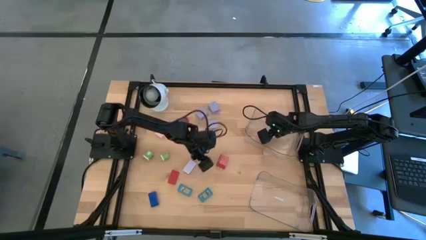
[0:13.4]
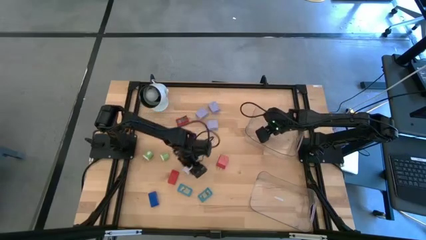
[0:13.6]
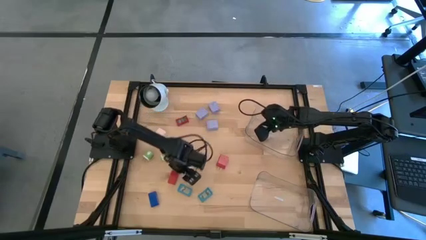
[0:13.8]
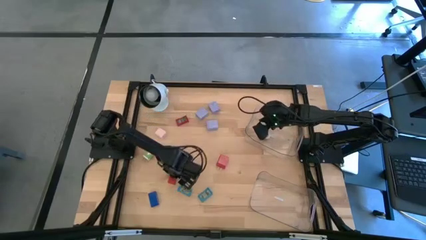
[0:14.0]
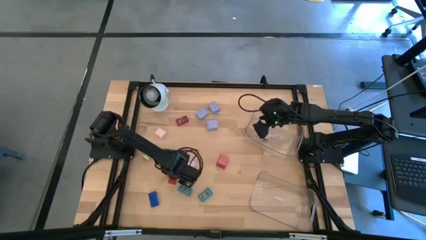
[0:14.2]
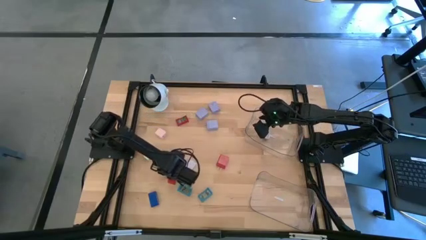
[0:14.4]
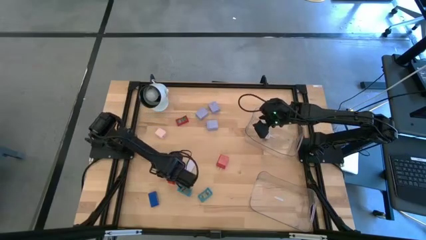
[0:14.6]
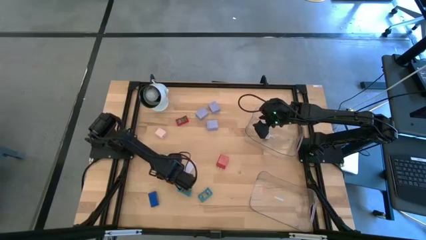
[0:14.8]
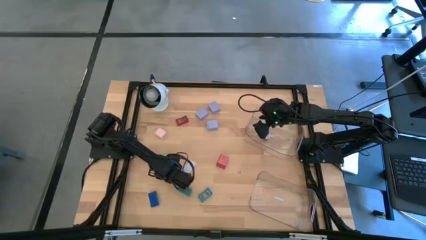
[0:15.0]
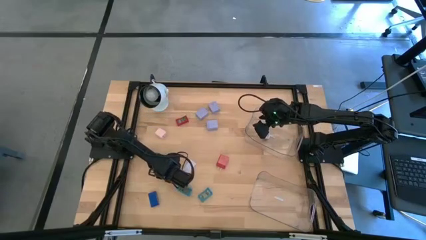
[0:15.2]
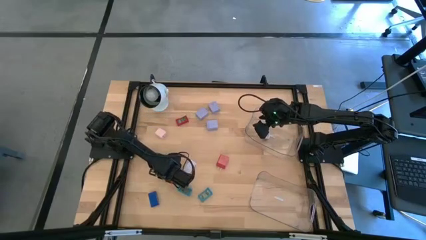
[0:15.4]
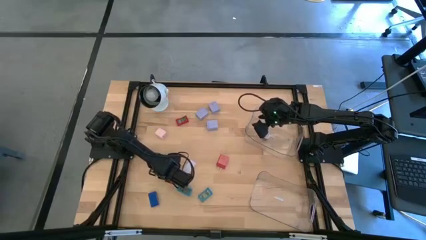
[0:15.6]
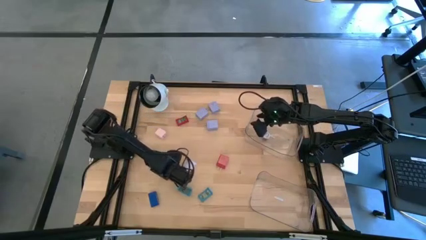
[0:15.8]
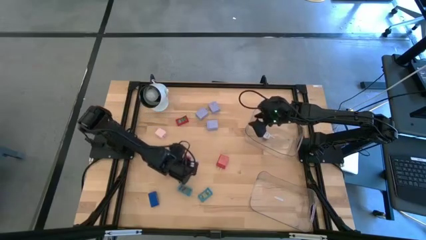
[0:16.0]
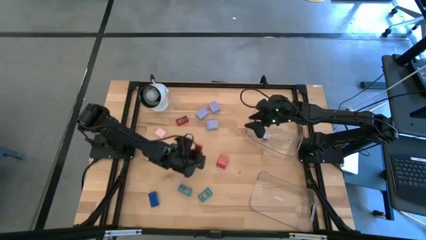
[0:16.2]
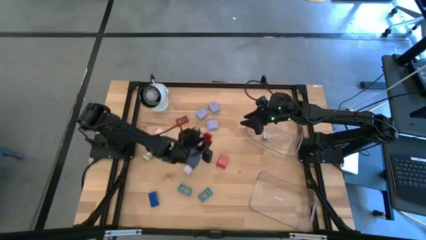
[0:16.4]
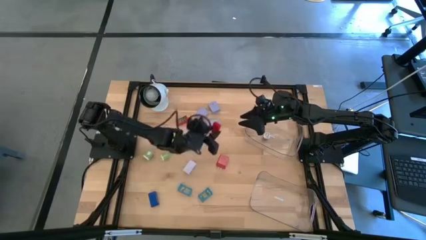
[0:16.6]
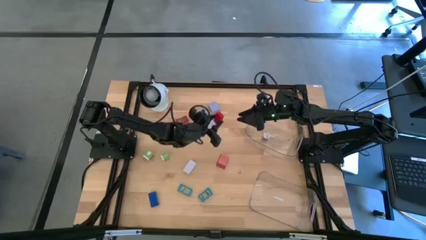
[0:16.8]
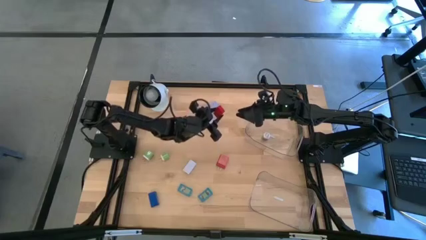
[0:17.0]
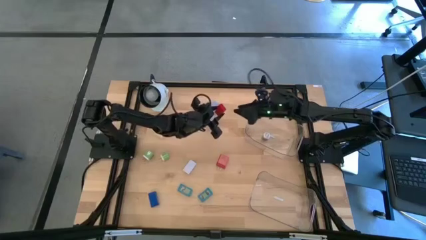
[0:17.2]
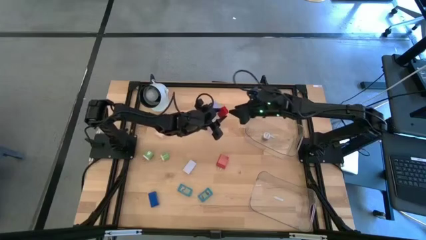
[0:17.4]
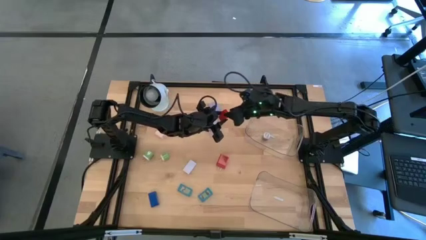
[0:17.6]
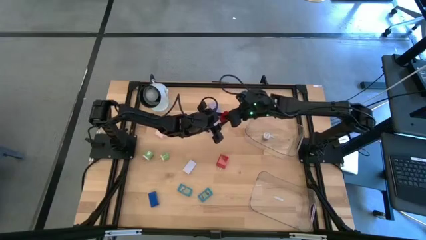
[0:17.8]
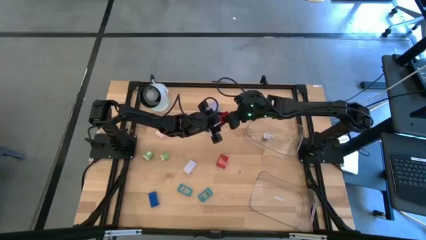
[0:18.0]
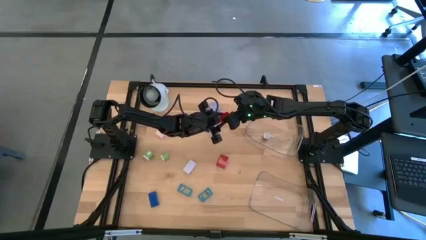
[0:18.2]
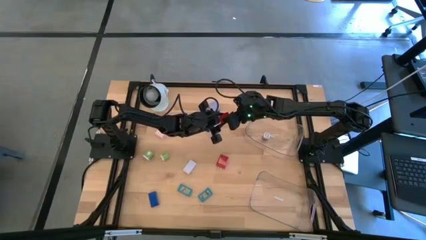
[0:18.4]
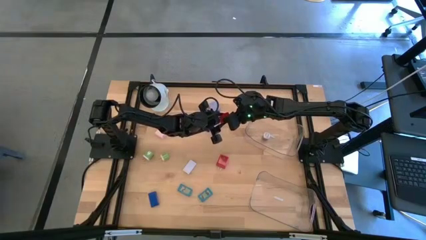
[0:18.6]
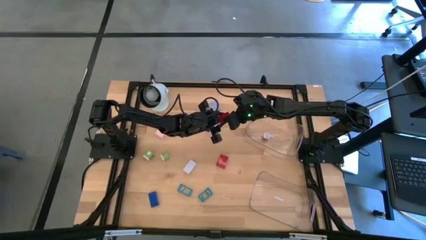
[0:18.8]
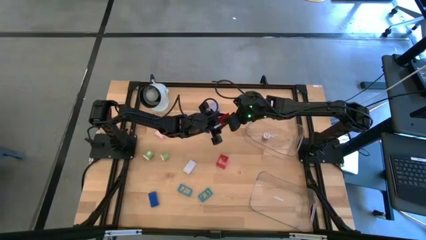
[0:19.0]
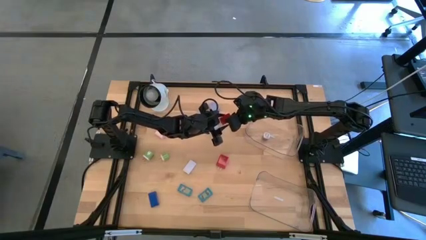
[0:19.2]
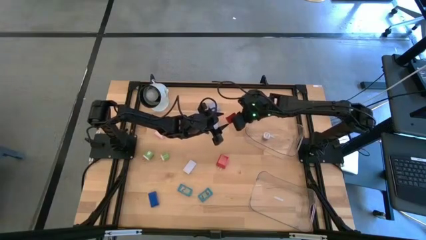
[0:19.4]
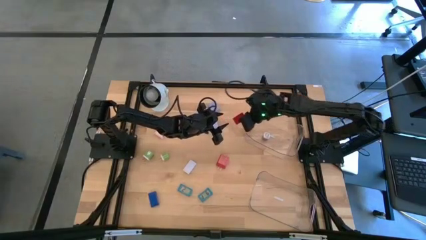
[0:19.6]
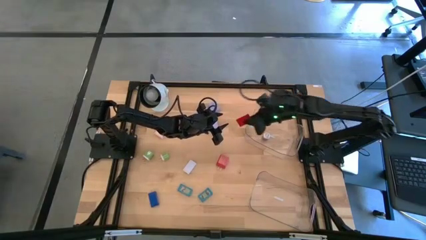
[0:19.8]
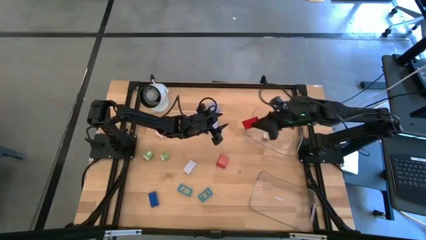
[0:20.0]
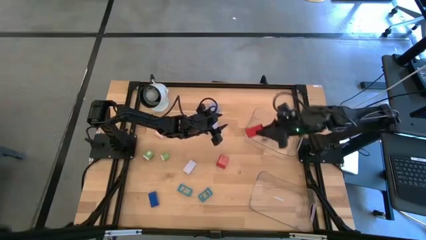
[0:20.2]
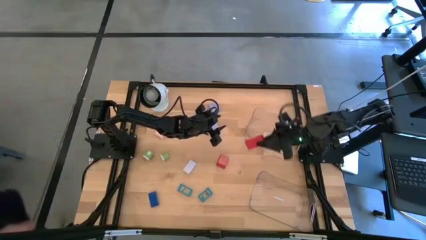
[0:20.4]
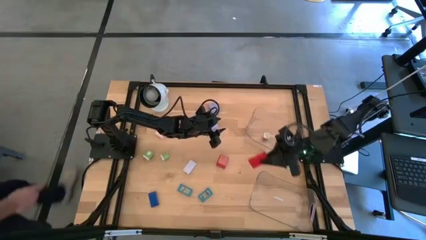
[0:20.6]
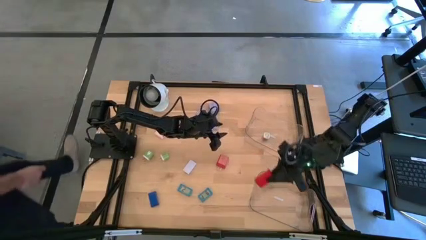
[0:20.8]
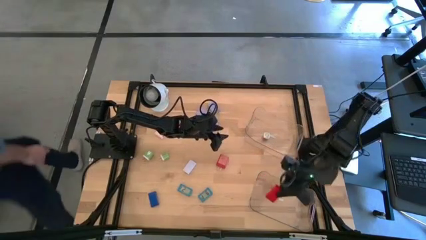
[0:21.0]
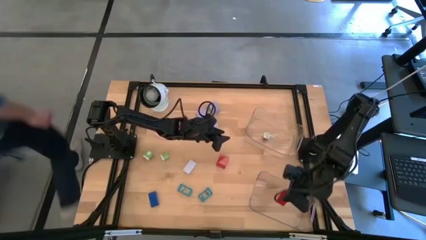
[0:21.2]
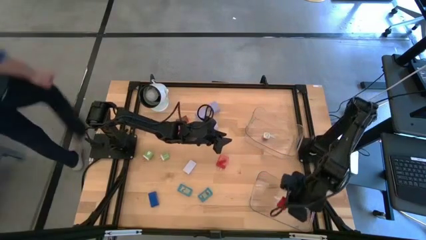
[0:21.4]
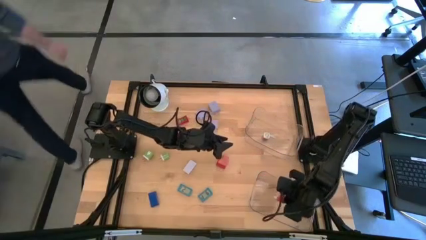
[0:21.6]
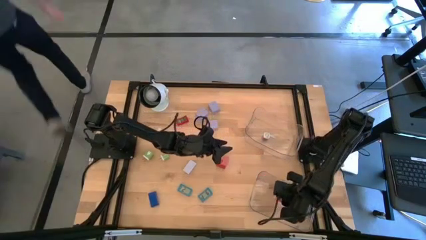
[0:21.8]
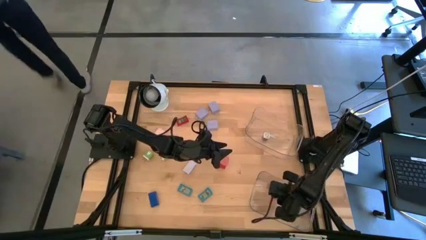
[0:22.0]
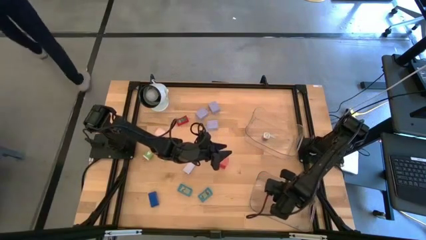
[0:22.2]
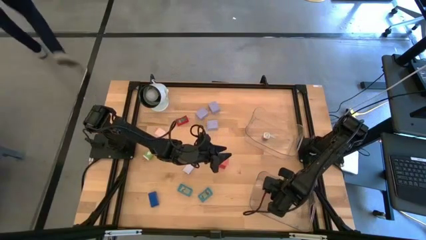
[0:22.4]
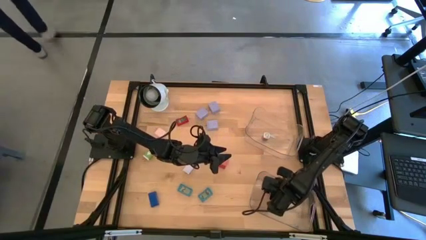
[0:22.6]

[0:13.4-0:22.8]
Task: Pick & Place Office items
Put the bottom red digital clock into the bottom transparent bin

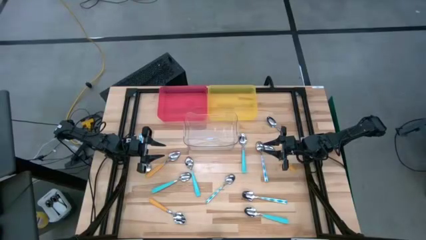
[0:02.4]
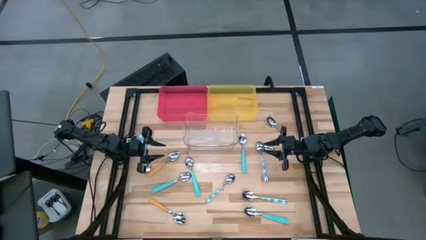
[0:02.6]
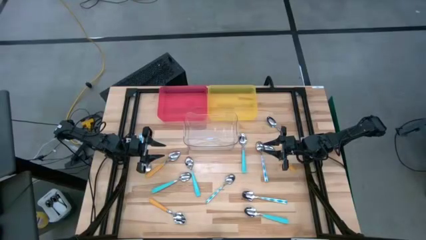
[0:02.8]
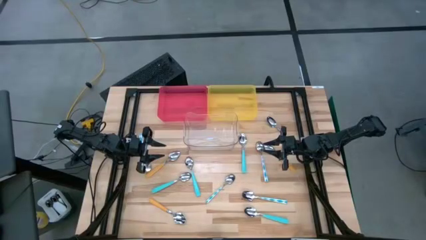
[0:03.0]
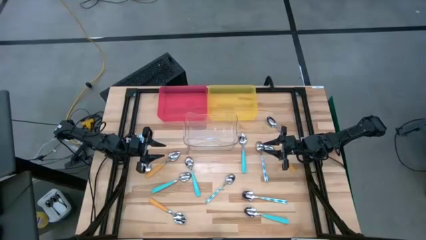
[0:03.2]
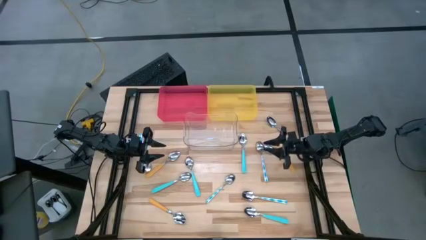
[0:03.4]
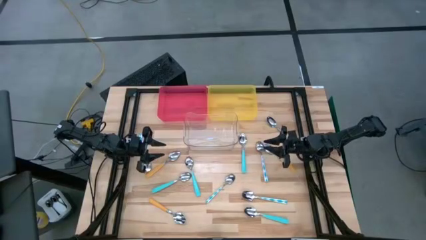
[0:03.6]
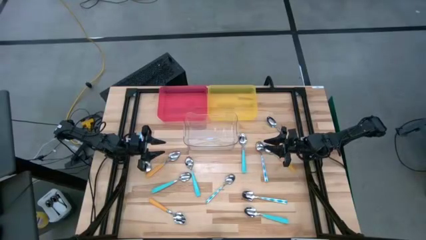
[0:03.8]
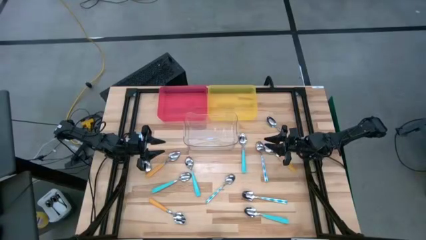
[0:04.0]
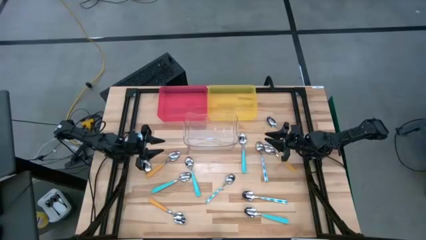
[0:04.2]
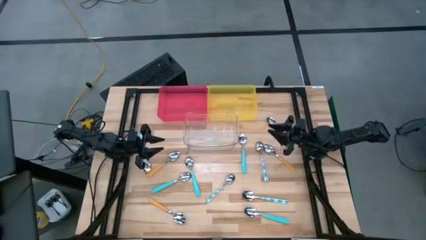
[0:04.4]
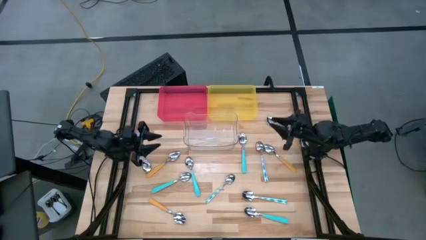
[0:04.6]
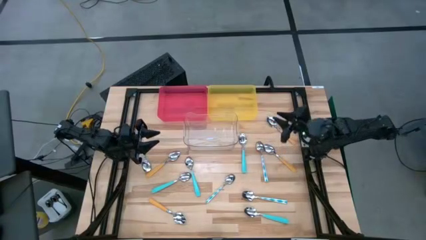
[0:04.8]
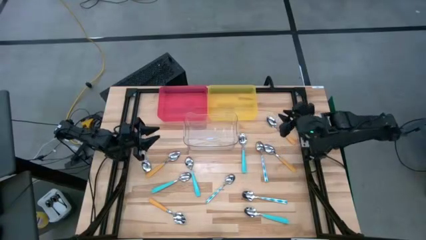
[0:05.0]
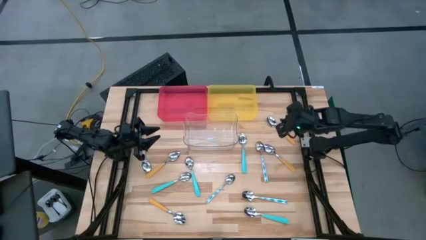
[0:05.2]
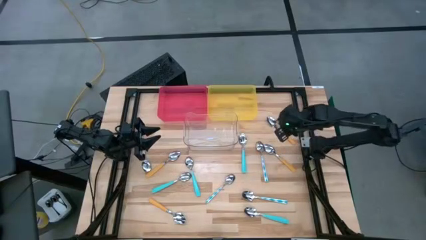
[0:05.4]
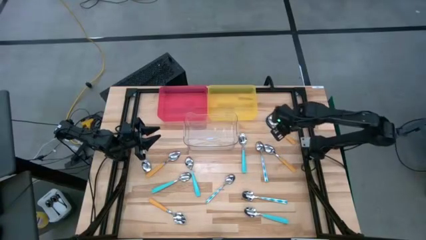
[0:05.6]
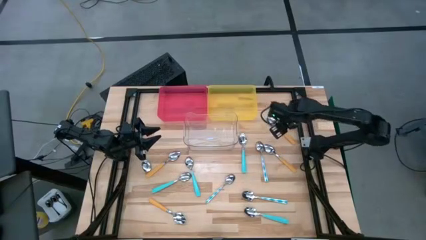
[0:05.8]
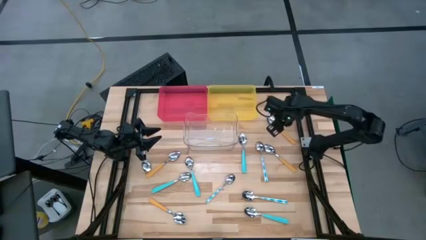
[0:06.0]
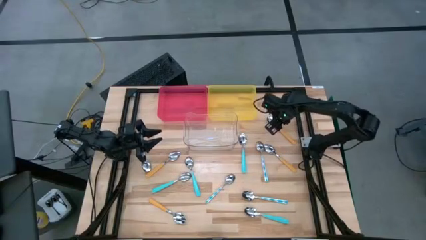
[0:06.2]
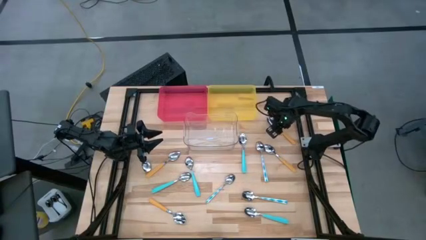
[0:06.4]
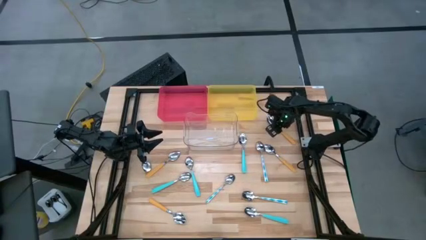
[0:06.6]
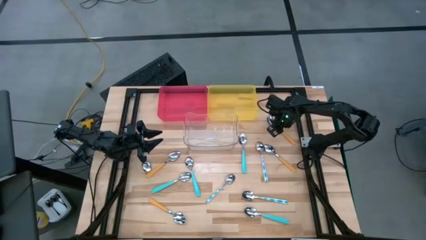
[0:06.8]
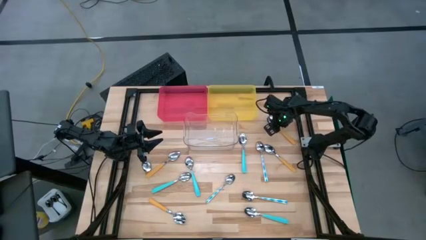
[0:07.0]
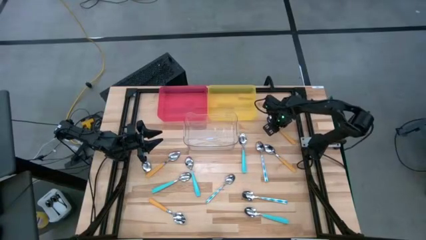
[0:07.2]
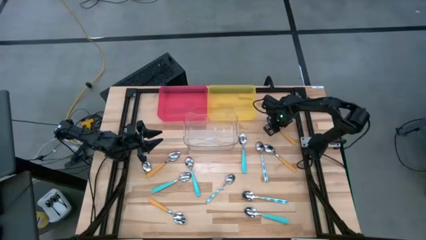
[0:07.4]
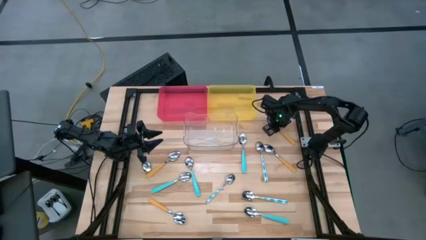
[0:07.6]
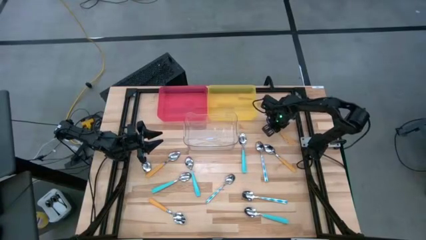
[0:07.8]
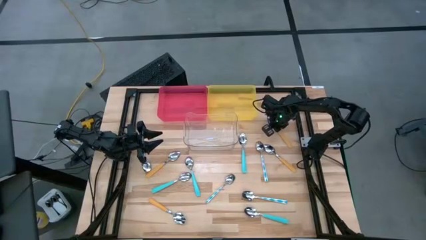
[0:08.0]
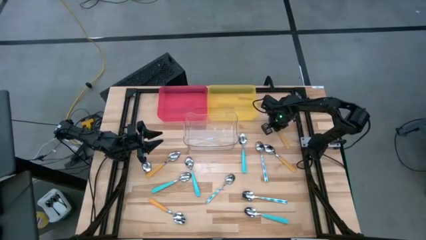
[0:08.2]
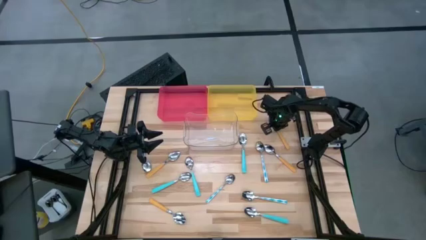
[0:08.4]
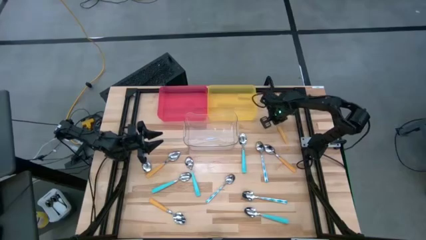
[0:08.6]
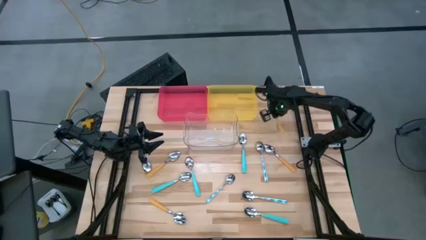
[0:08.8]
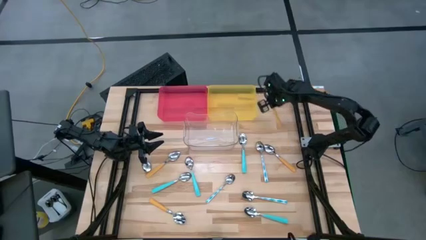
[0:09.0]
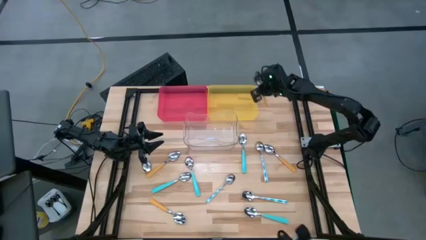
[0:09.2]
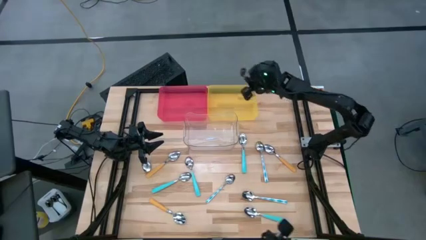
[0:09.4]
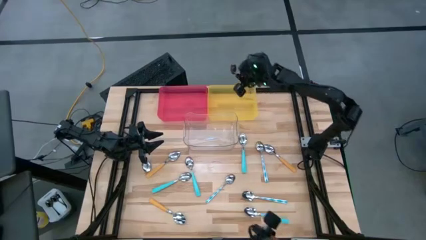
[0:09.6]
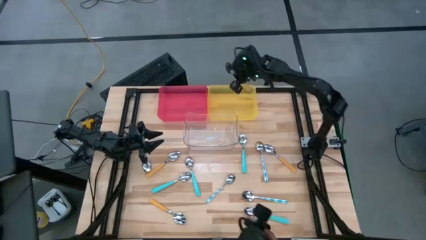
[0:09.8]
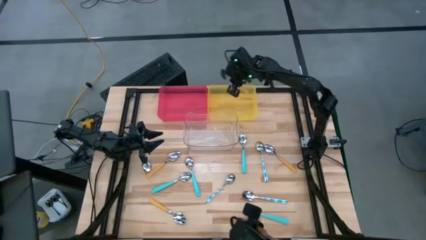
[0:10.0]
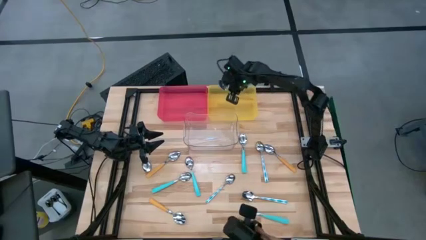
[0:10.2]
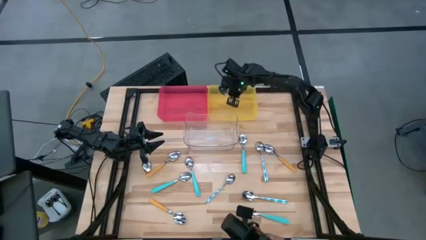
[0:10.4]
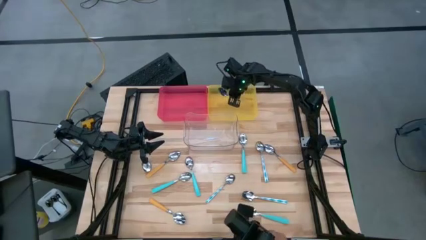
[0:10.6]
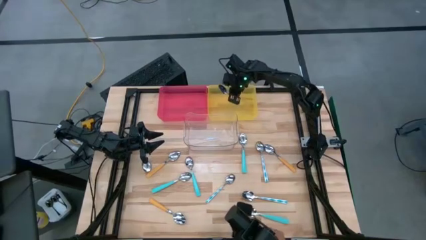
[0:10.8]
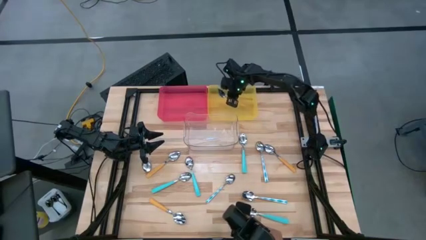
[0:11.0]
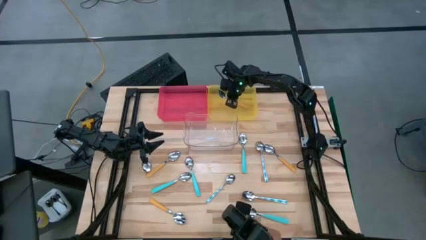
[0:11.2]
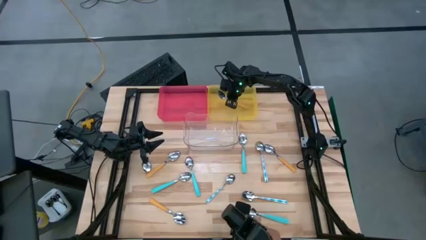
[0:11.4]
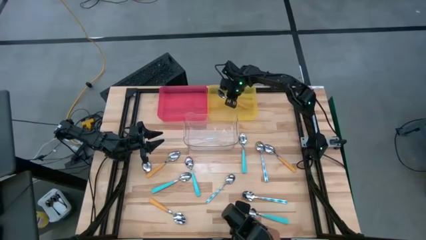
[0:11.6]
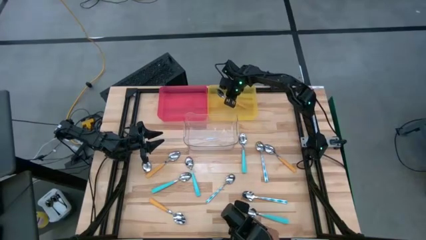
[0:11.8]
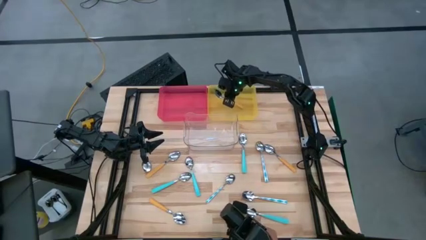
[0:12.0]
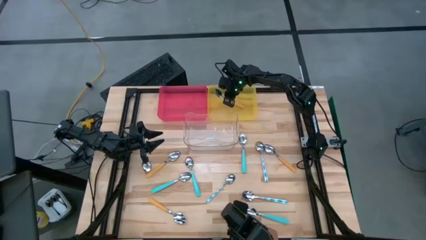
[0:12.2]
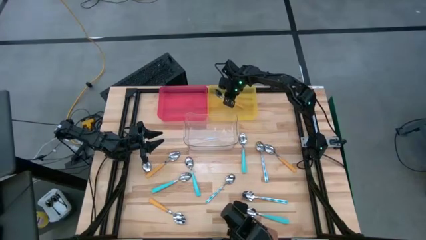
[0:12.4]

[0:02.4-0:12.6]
Task: Sort silverware by color (type)
Put the yellow spoon into the yellow bin
